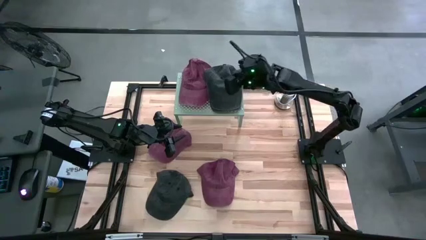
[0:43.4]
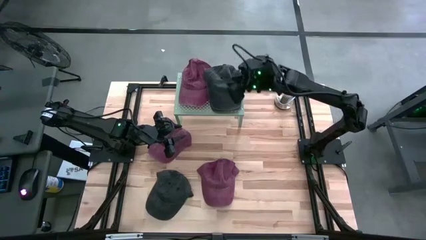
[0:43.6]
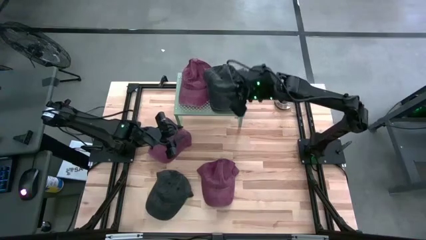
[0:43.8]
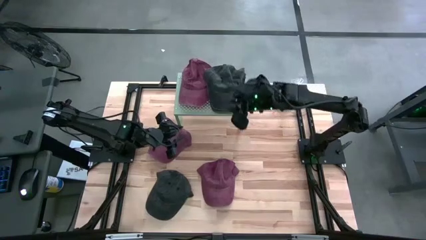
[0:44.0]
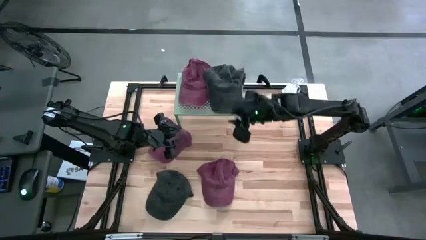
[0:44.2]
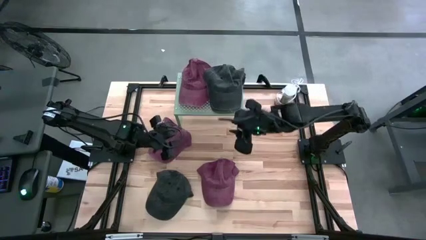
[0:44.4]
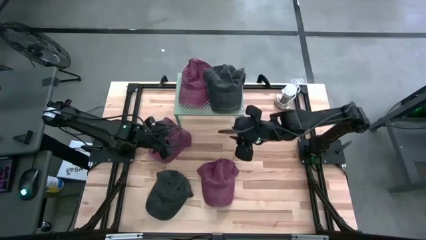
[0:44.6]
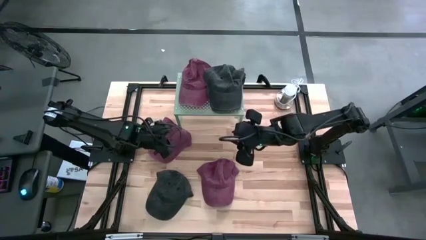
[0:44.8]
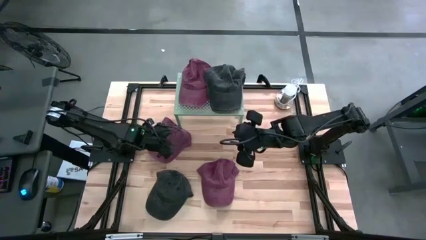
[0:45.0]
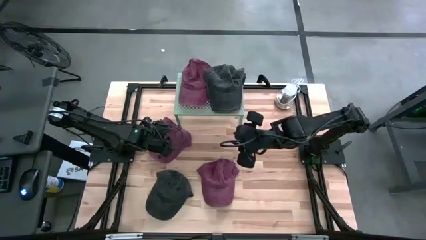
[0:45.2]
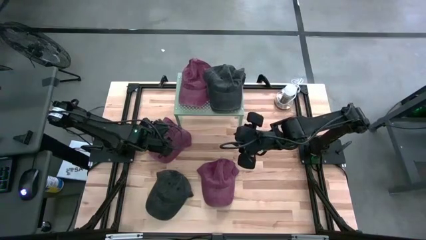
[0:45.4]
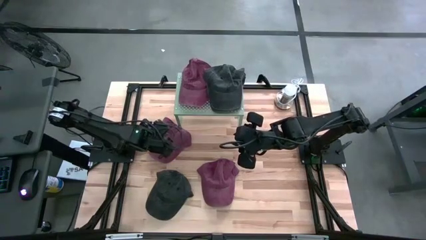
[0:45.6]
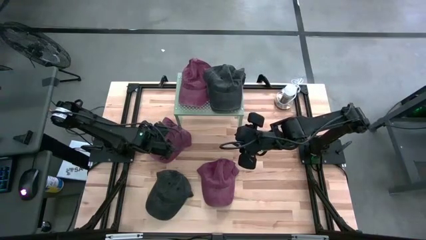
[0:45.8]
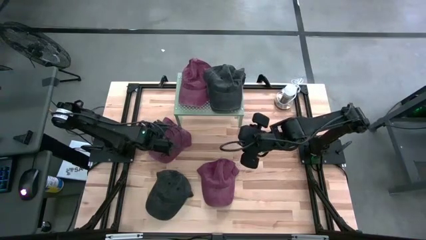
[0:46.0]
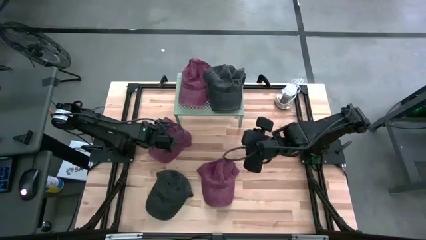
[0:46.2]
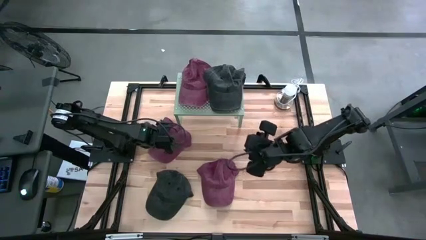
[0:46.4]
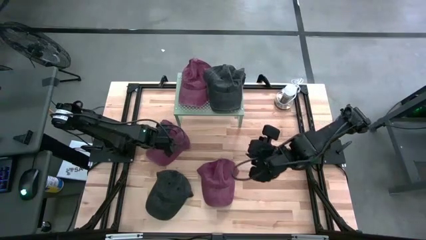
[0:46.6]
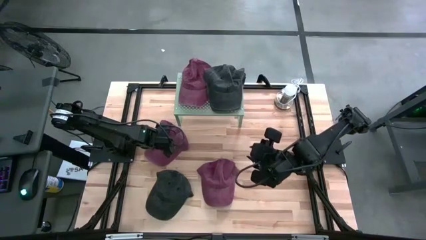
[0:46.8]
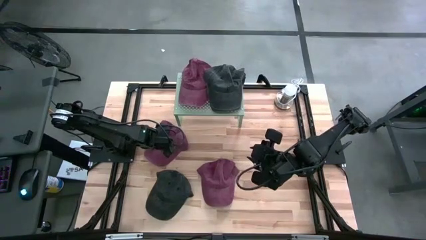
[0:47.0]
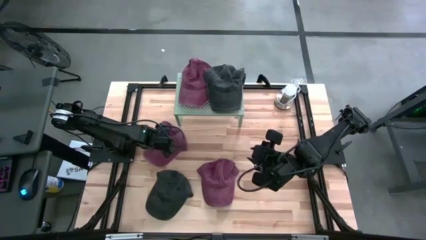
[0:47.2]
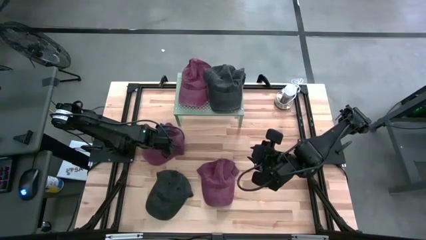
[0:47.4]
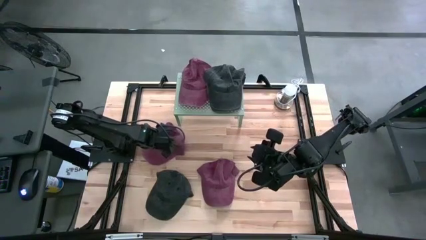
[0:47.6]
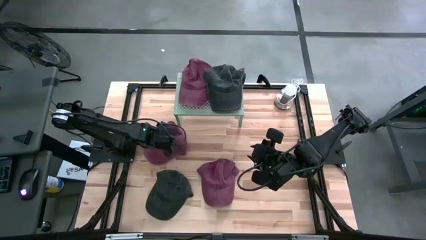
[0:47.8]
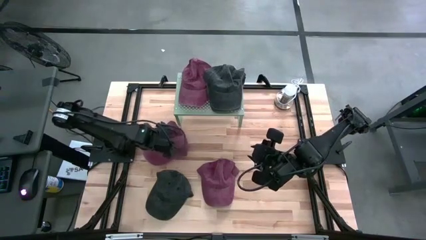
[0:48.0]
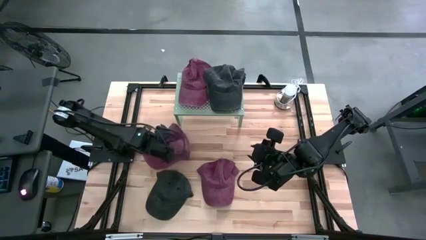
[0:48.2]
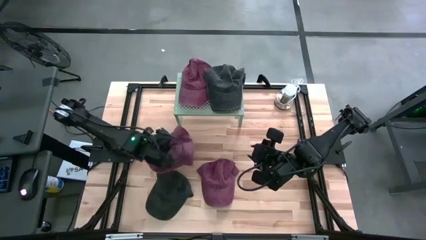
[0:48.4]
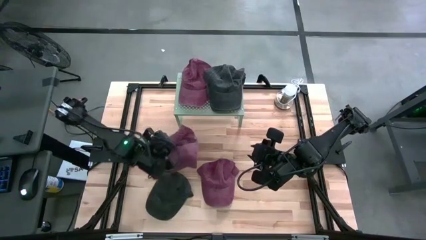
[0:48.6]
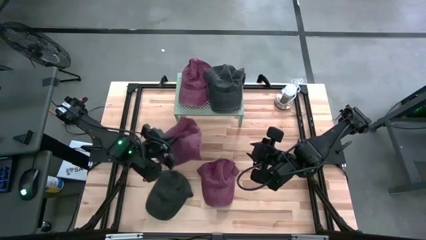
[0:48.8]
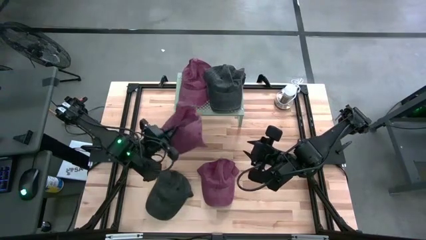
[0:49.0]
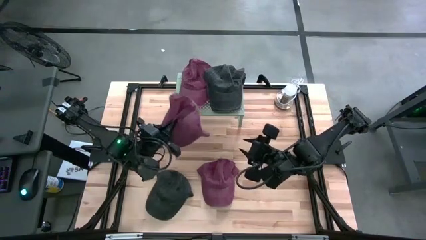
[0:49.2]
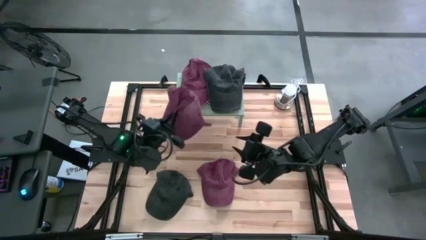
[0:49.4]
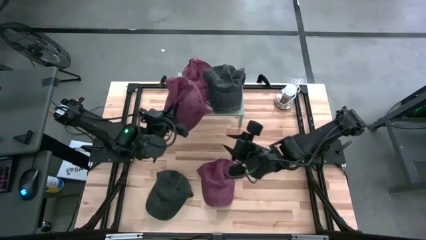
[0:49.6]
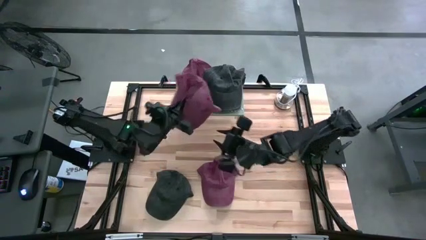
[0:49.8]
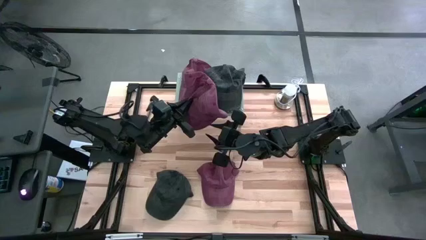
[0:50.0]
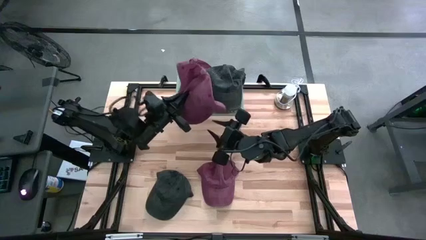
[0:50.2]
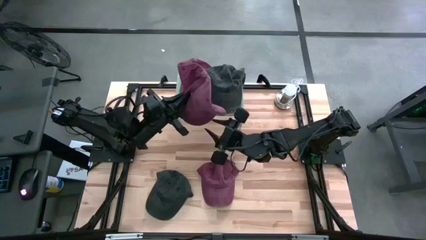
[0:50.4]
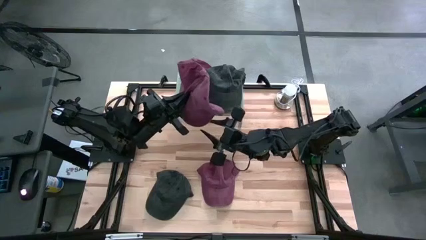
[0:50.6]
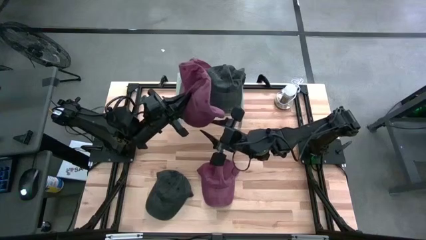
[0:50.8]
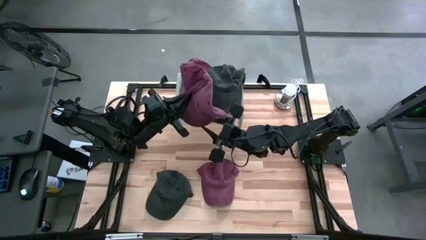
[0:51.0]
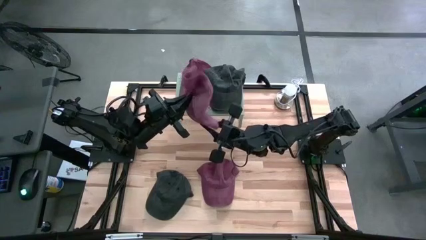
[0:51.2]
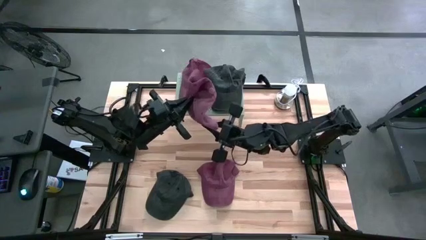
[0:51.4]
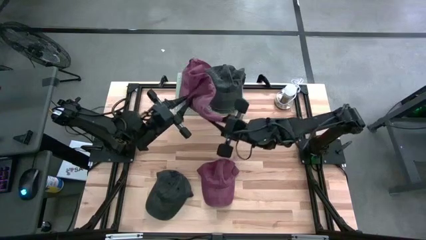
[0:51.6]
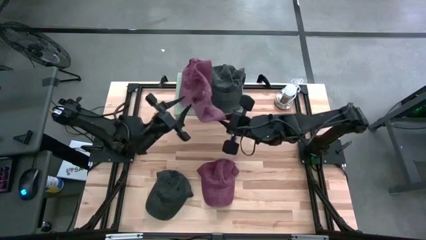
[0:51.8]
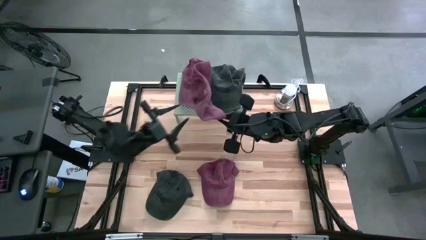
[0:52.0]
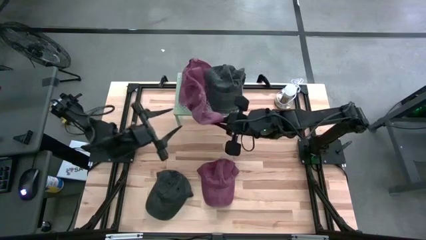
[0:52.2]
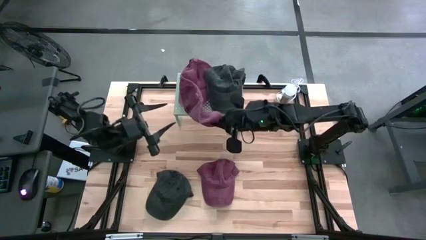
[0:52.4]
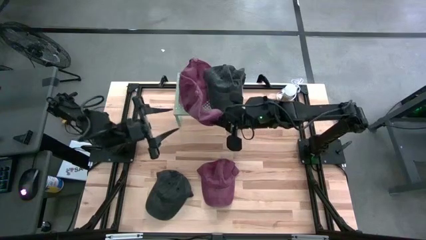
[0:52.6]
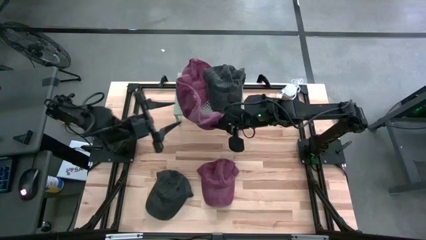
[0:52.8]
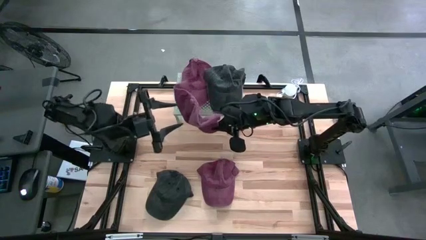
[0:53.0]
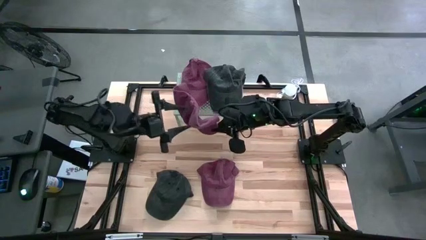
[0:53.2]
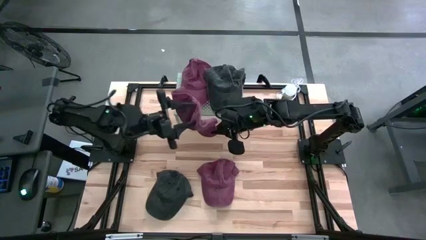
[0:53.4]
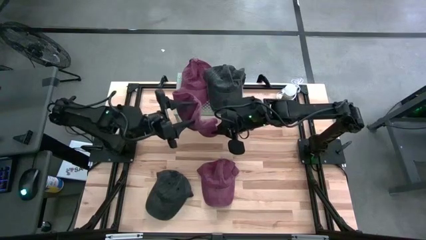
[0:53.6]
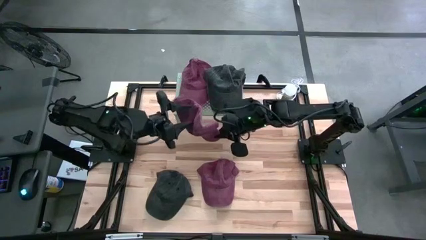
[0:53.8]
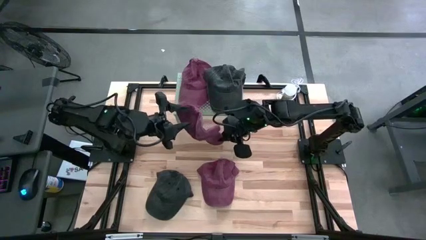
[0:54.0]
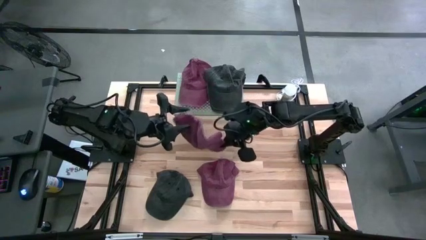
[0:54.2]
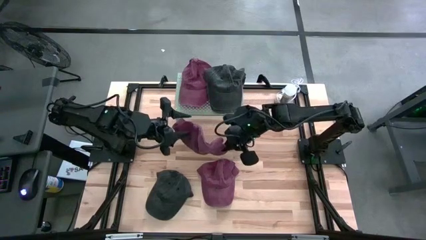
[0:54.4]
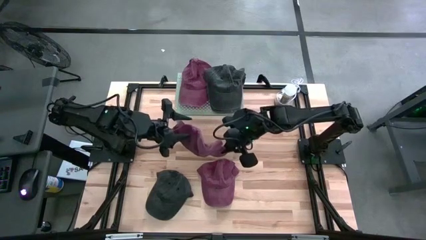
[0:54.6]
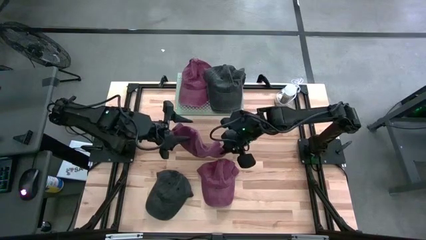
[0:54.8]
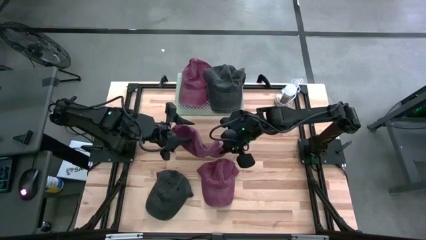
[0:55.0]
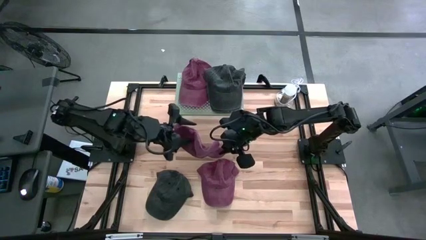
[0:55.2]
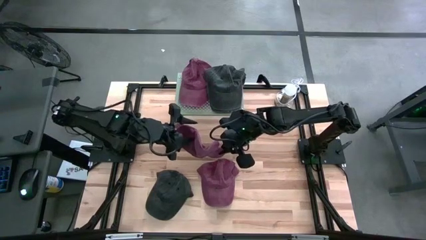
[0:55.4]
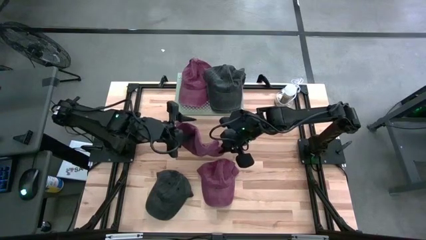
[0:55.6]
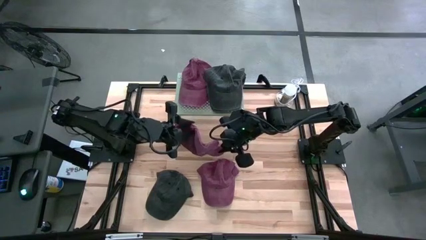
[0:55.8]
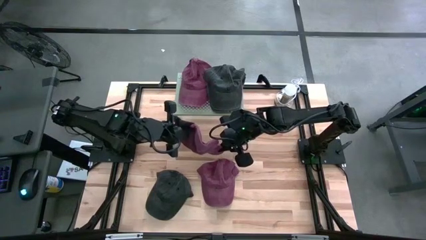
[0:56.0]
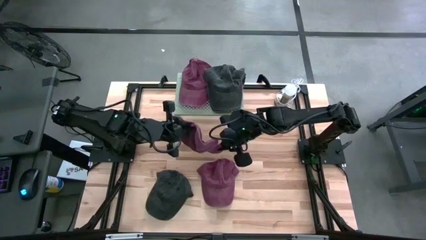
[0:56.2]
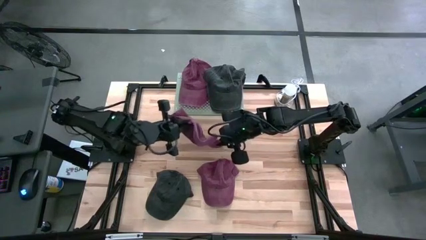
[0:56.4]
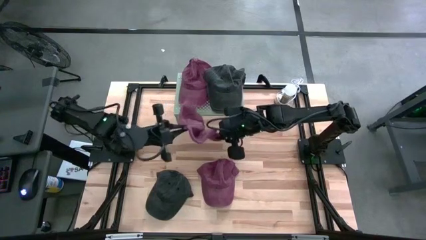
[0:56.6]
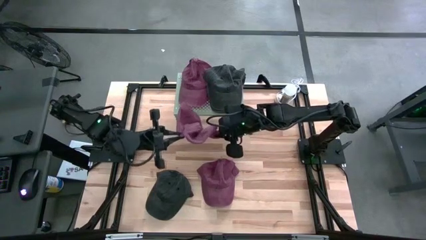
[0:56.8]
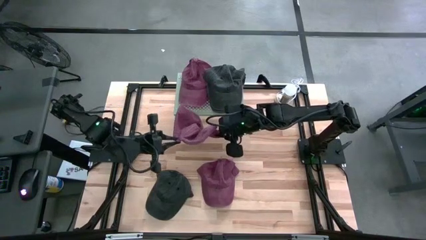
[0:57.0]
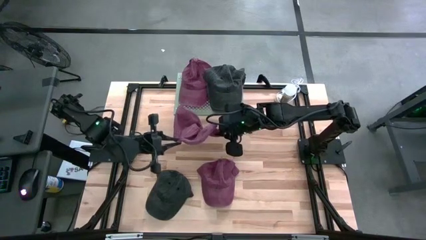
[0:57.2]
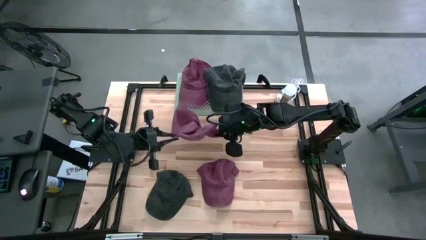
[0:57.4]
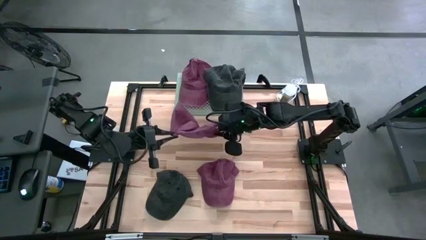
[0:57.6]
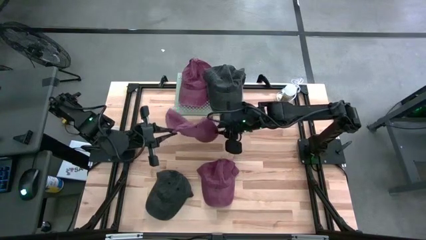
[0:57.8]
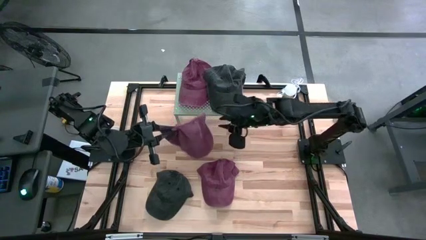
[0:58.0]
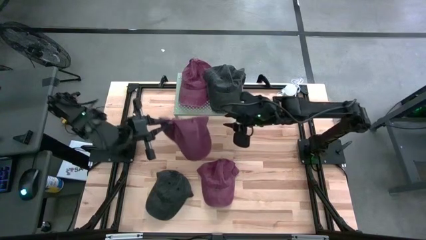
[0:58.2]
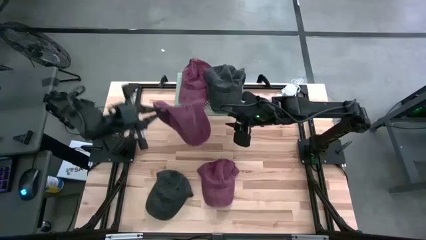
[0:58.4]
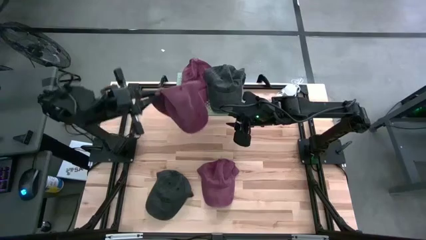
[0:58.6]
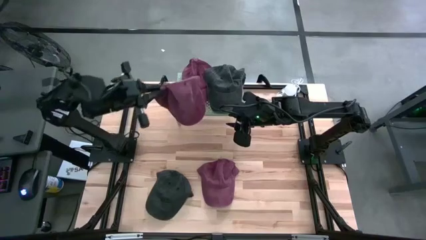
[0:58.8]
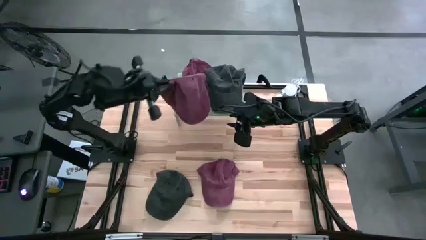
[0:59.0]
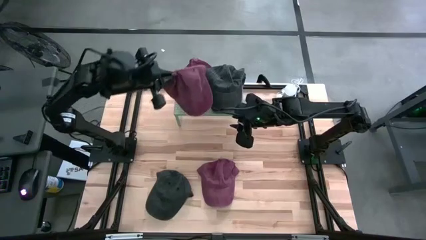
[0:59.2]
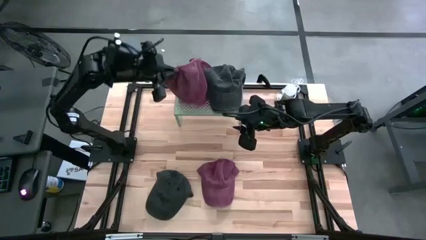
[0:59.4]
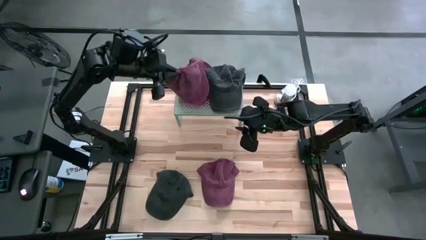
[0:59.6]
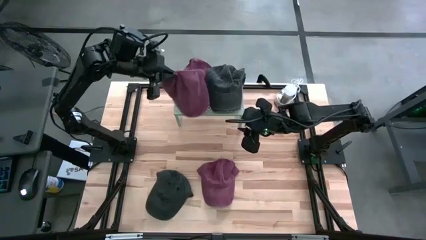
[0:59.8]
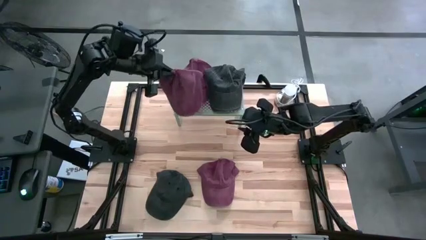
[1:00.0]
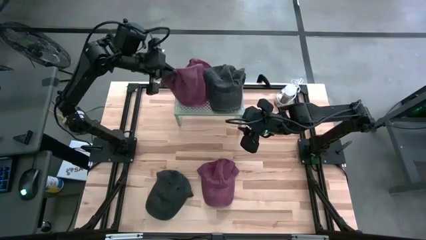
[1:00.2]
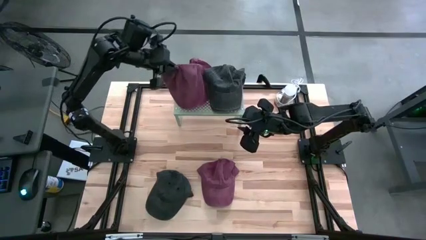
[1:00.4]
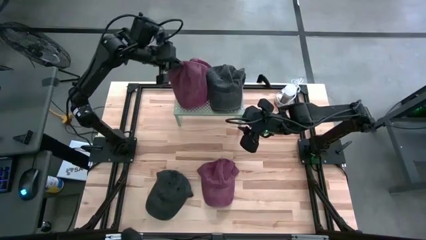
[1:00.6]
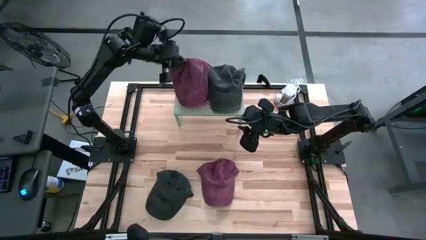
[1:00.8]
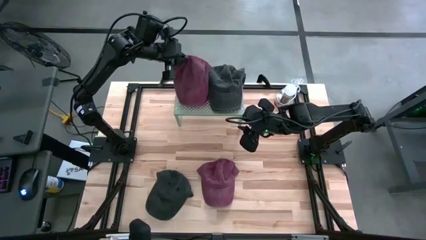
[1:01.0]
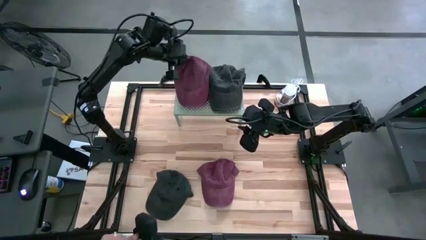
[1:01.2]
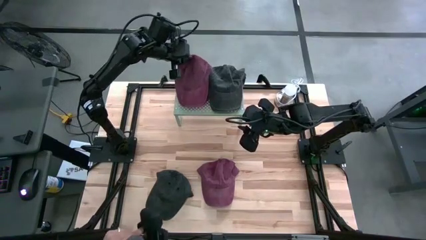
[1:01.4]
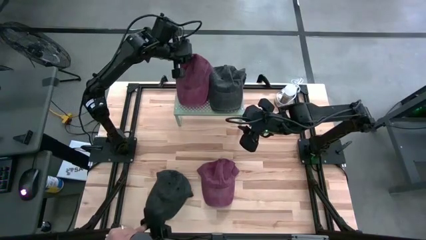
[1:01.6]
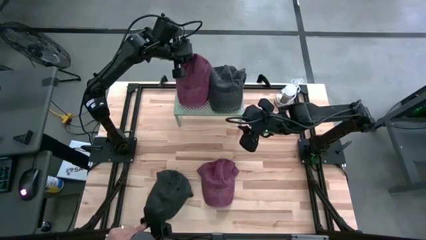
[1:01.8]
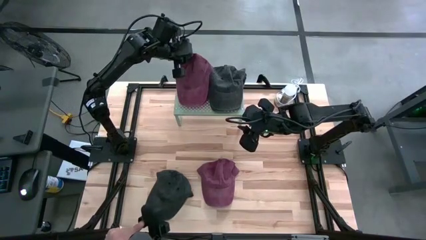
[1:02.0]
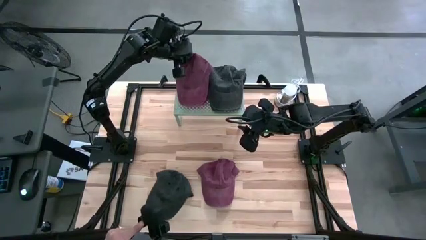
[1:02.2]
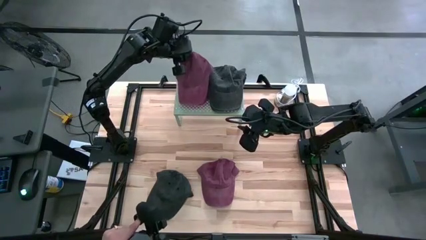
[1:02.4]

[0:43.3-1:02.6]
Task: Pick & Place hat
Stack the top red cap on the red cap on the shelf
